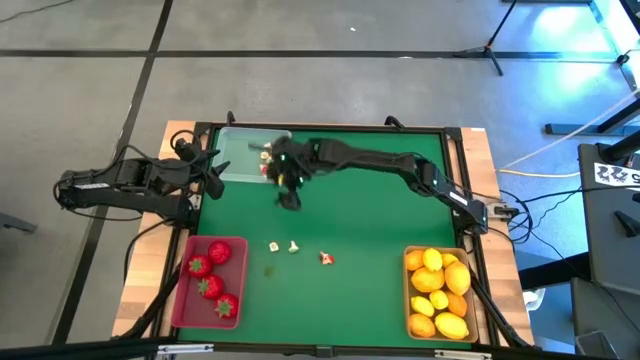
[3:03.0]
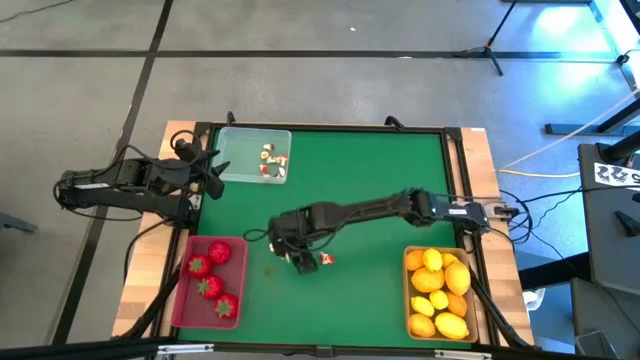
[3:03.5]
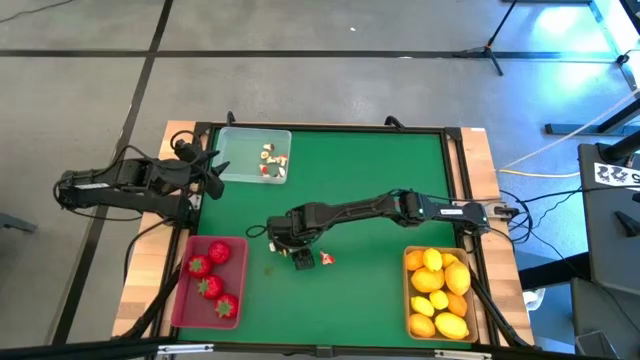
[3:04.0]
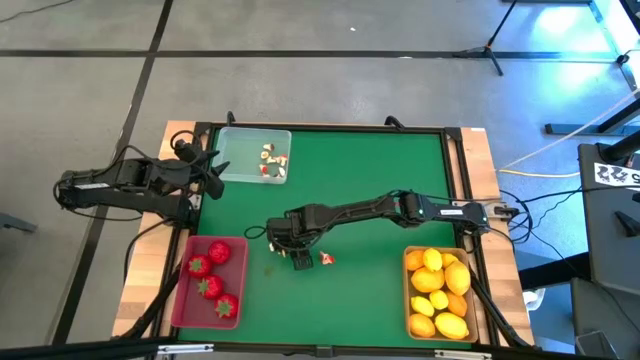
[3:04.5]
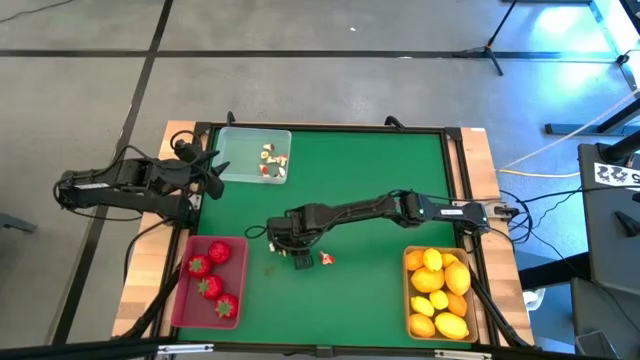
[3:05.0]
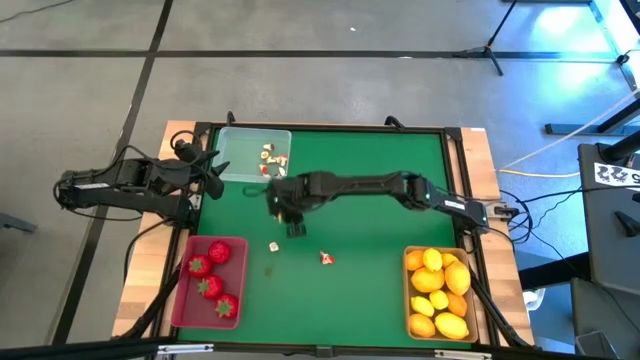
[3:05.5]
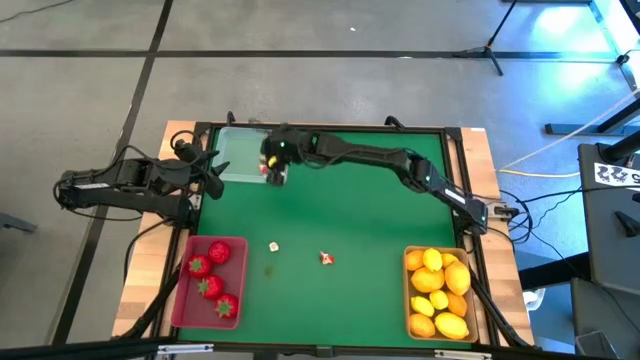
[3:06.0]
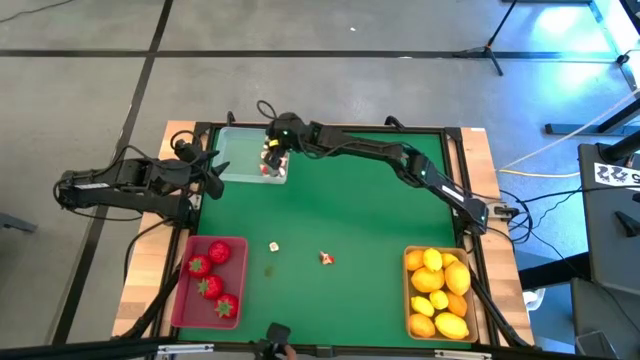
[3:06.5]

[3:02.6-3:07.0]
Task: Sort produce into baskets
Put the green mushroom into the transparent bin

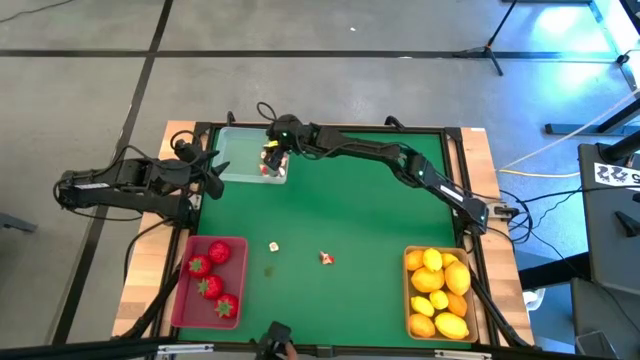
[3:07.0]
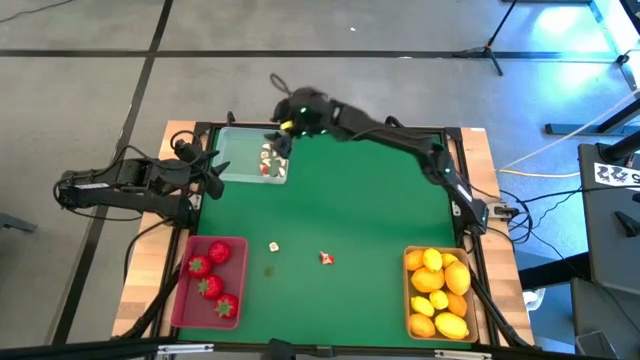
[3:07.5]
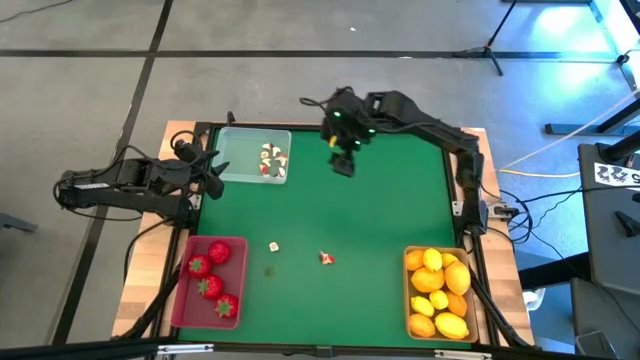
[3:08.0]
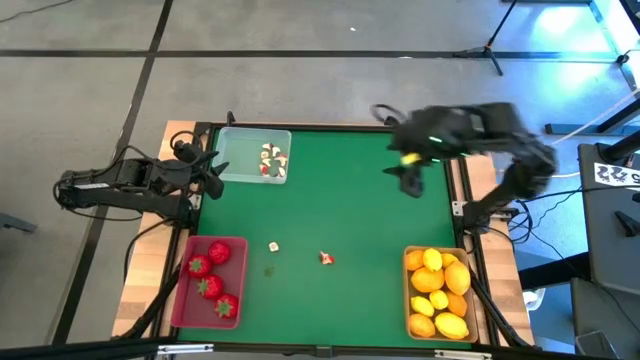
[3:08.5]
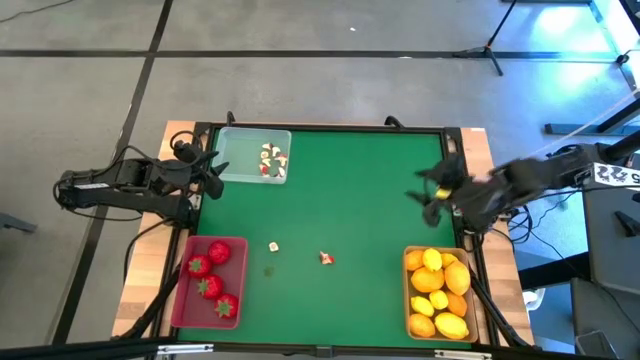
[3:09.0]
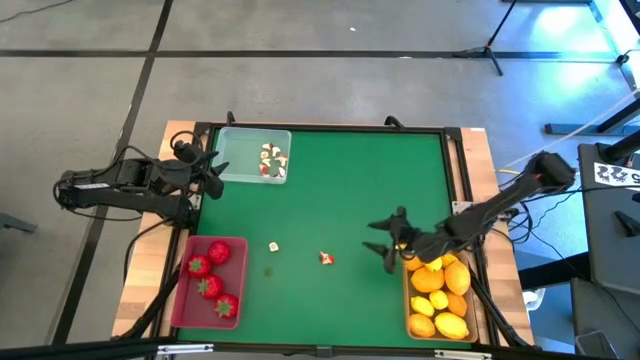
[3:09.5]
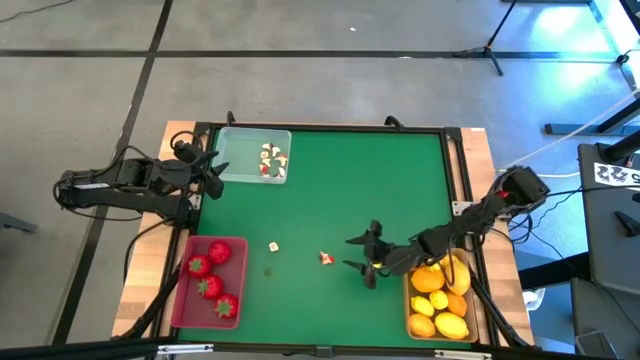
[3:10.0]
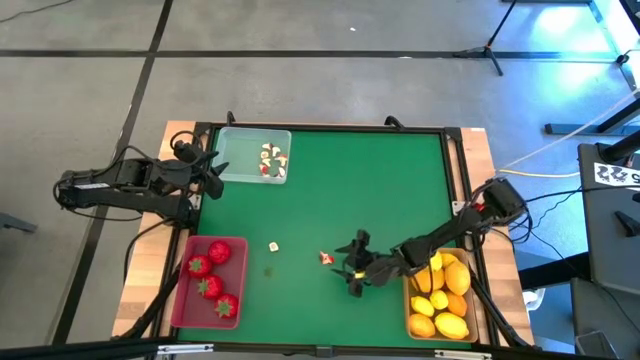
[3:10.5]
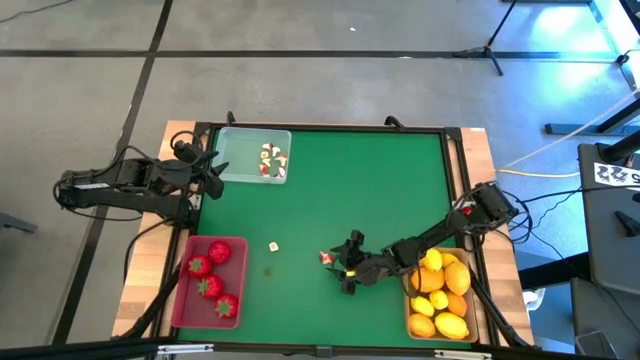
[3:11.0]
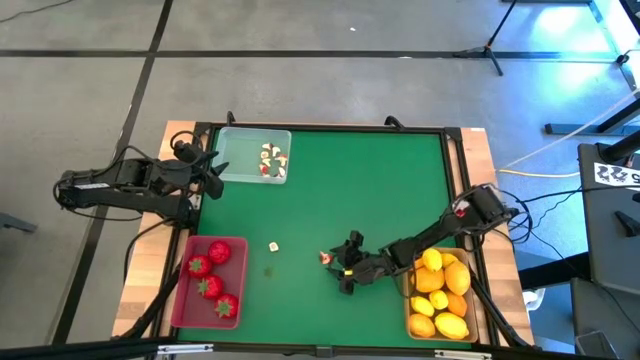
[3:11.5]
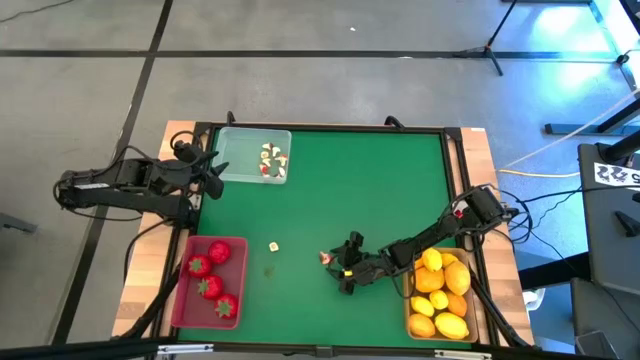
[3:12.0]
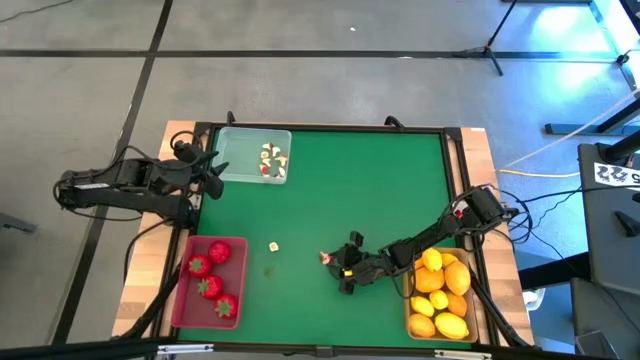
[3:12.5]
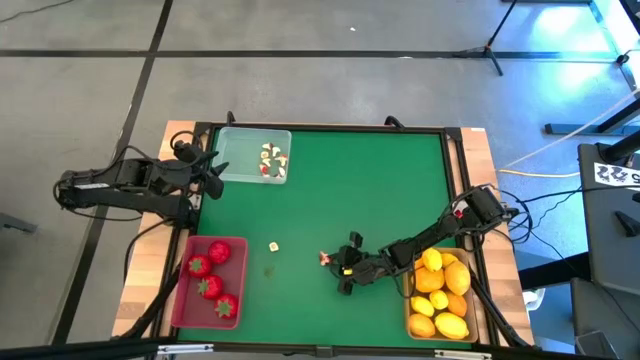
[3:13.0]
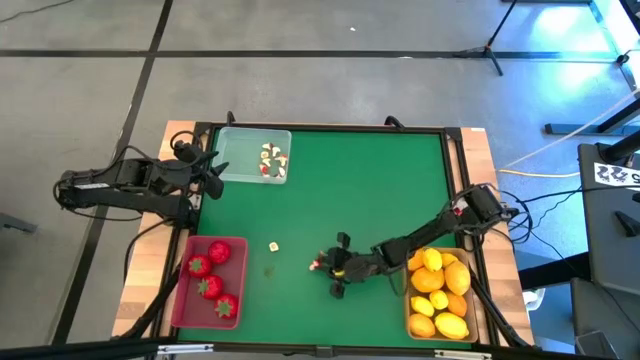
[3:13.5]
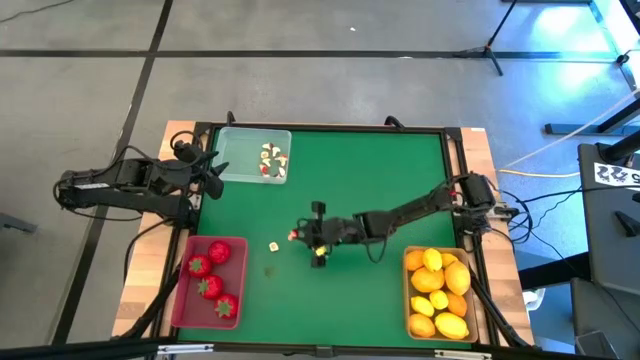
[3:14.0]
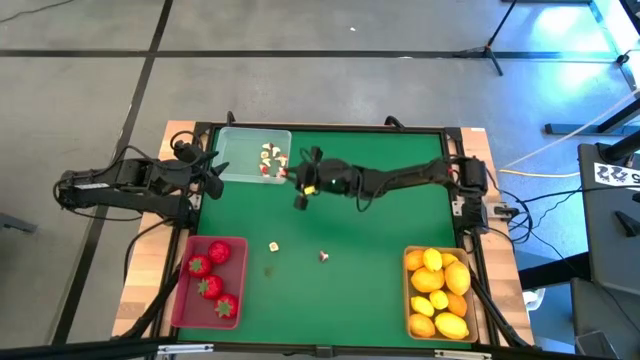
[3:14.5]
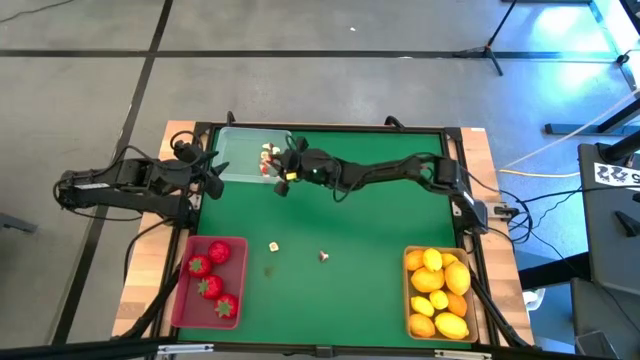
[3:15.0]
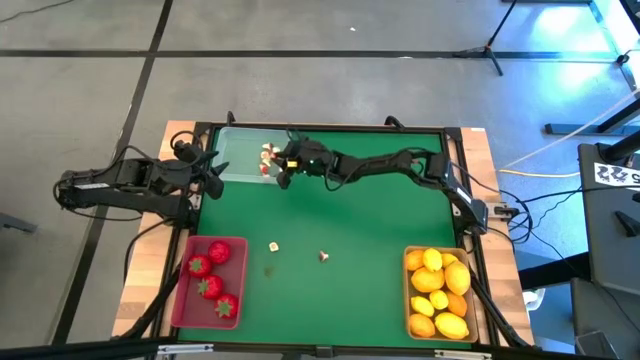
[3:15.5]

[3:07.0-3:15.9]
Put the red mushroom into the transparent bin

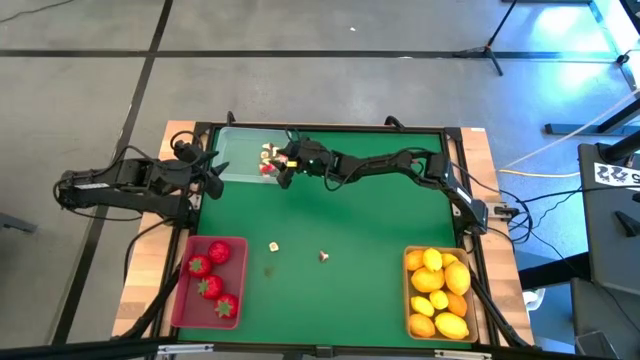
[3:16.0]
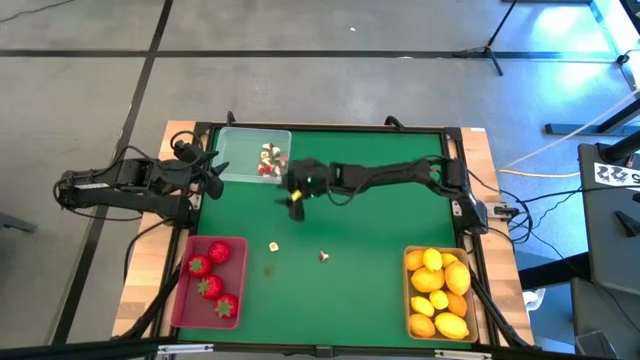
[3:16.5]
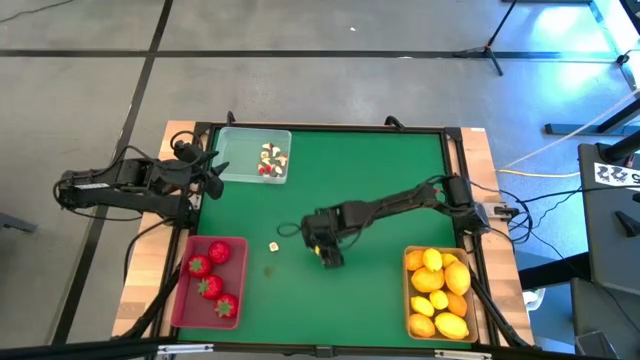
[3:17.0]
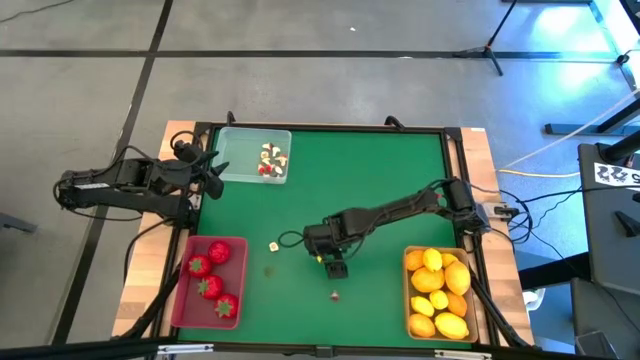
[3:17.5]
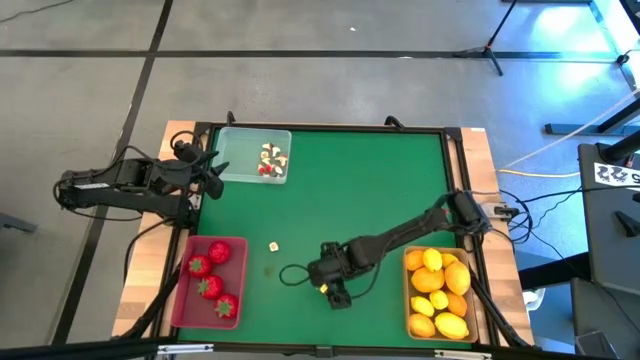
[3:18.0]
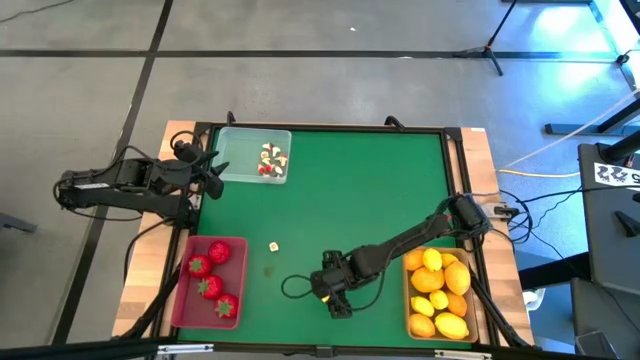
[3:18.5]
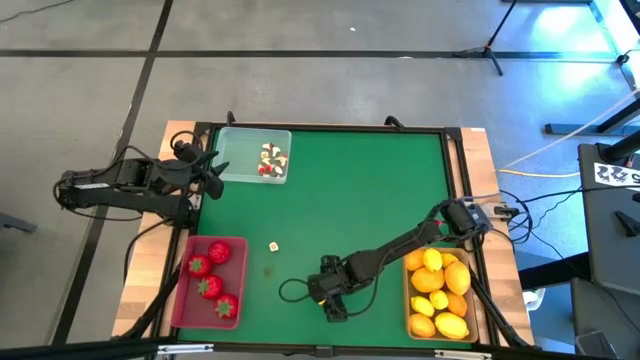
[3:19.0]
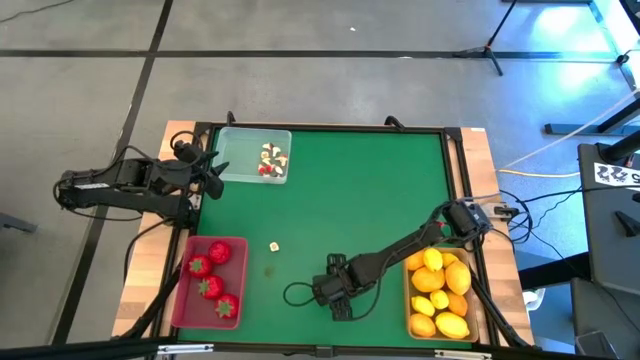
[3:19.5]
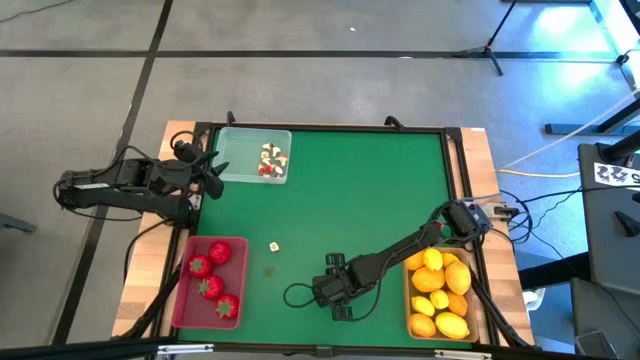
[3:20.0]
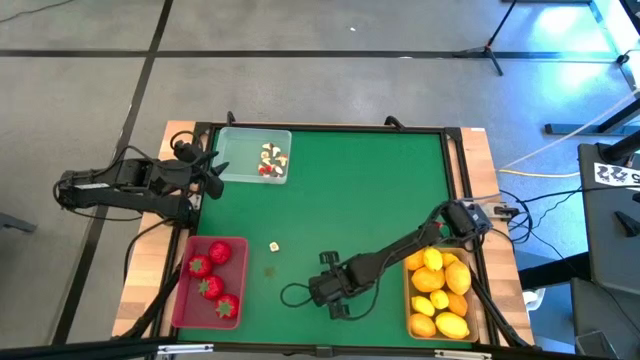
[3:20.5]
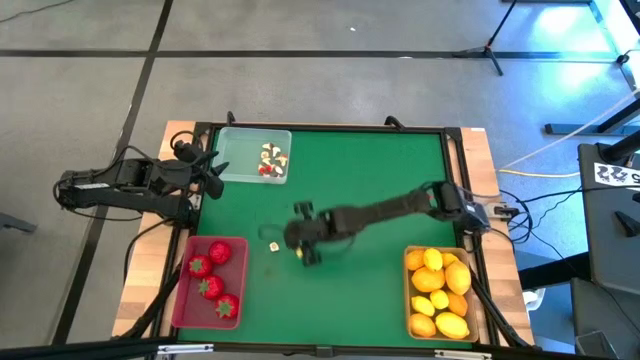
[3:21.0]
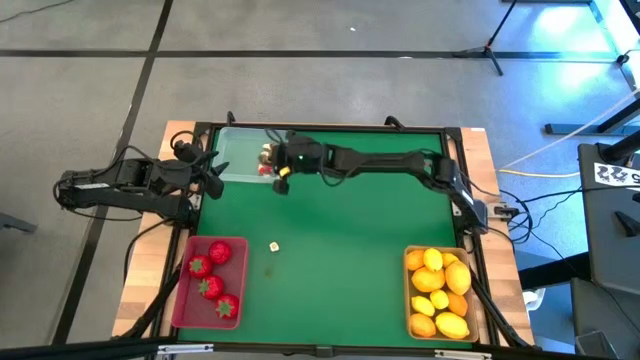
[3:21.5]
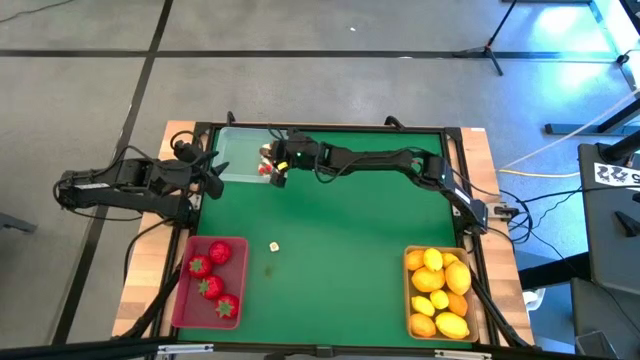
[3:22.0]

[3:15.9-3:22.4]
Put the brown mushroom into the transparent bin

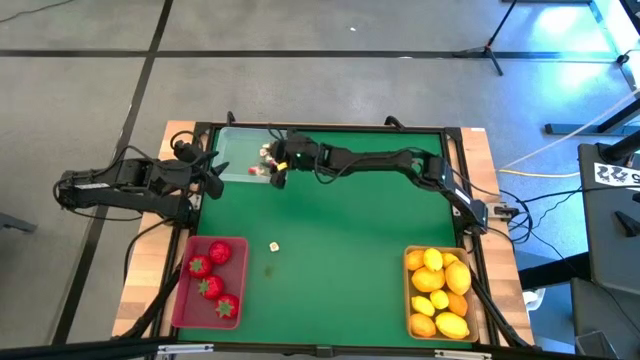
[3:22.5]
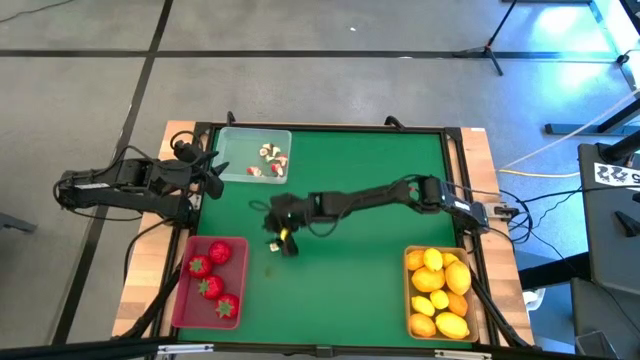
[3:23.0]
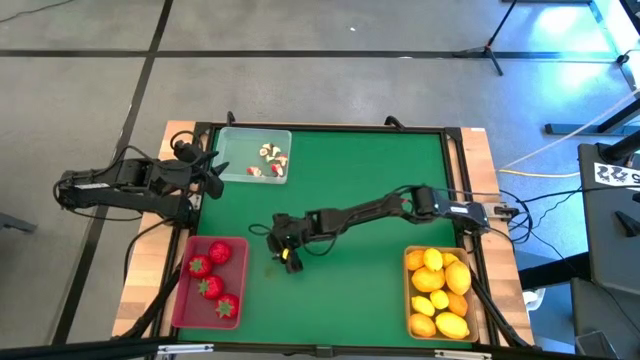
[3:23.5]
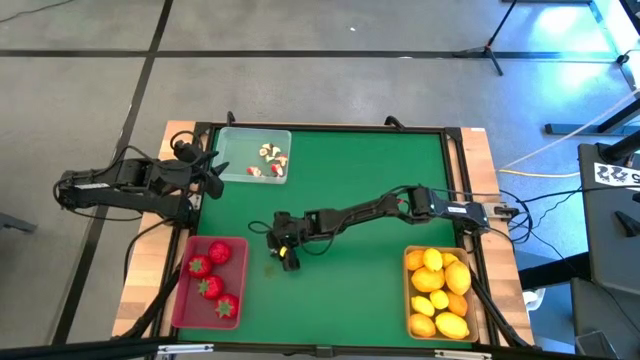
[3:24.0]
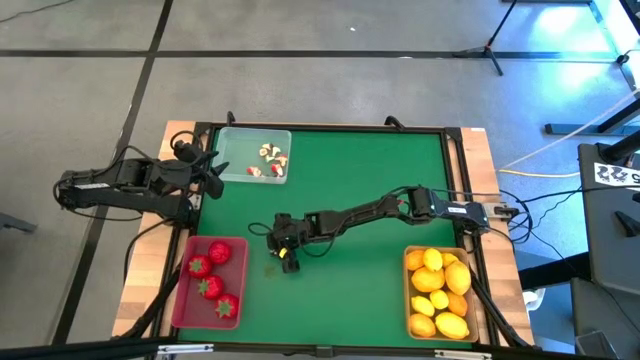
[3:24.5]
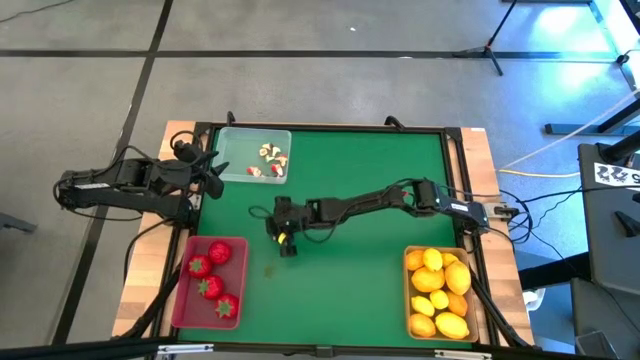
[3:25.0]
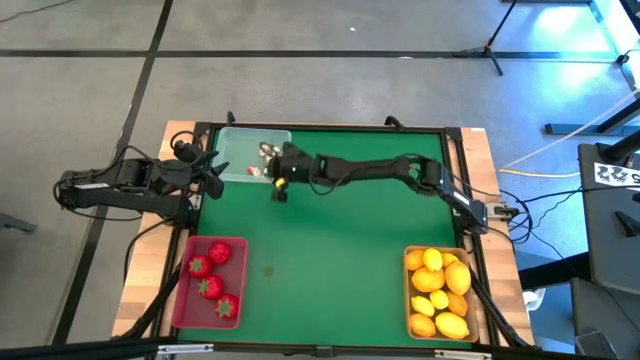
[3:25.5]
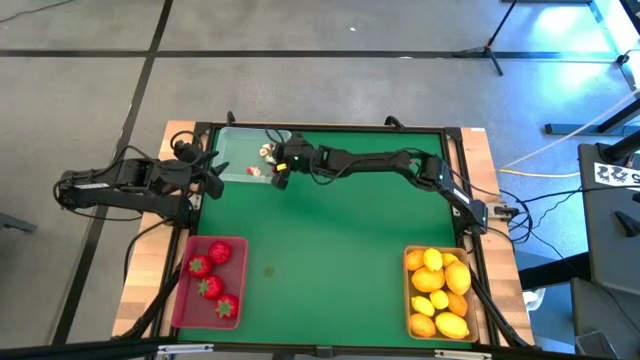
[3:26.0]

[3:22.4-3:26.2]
Put the green mushroom into the transparent bin
